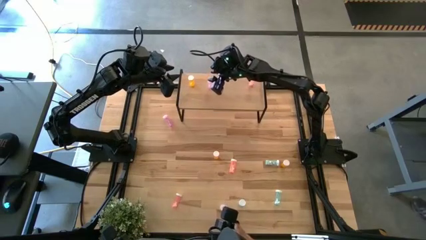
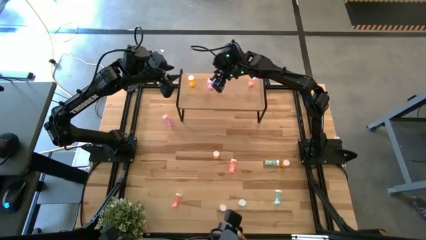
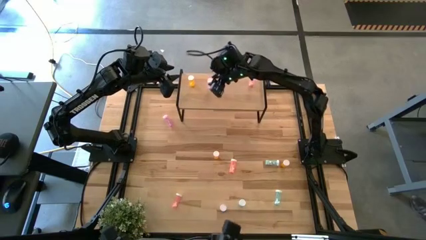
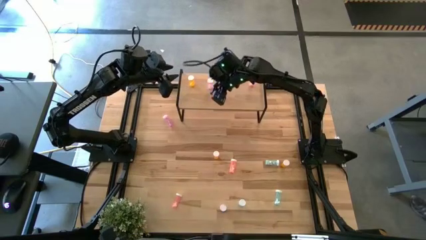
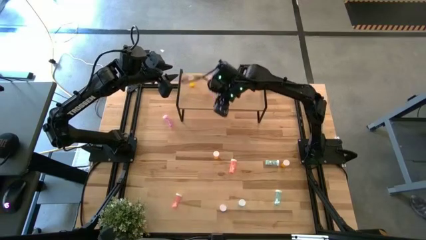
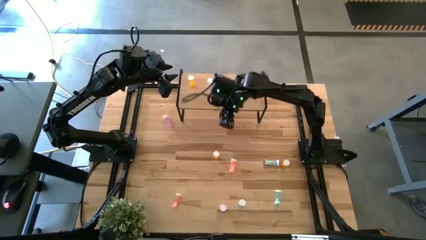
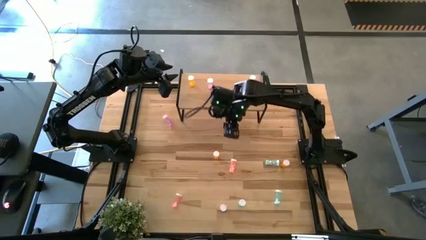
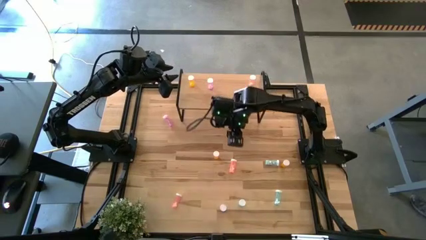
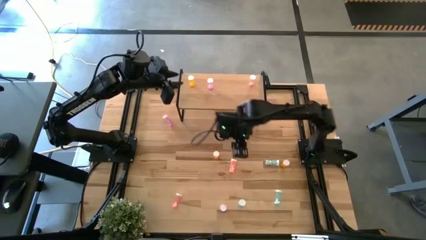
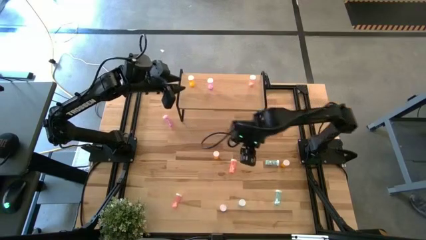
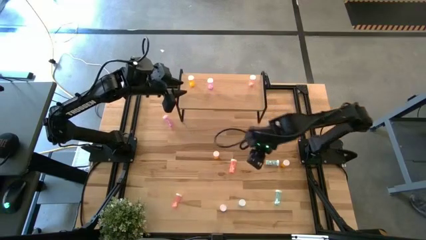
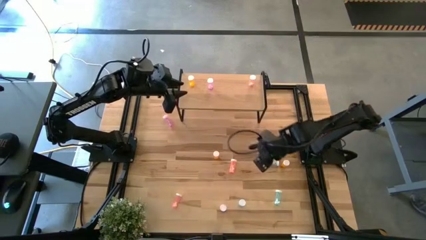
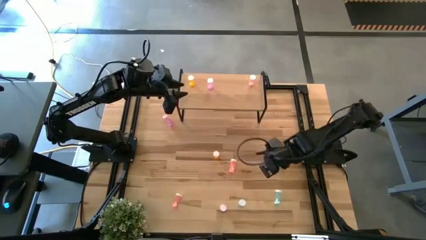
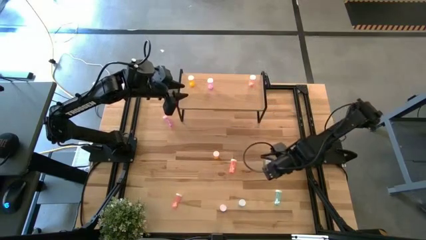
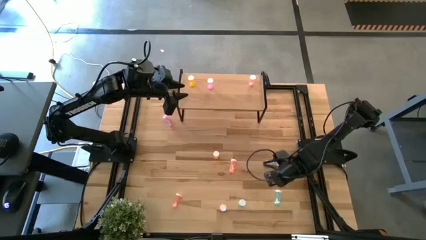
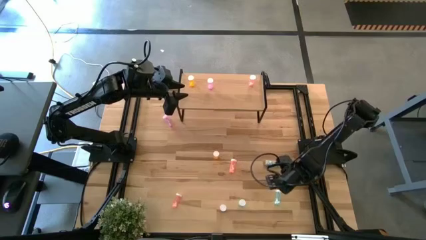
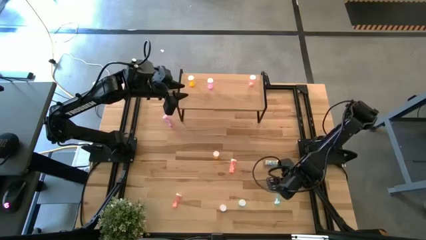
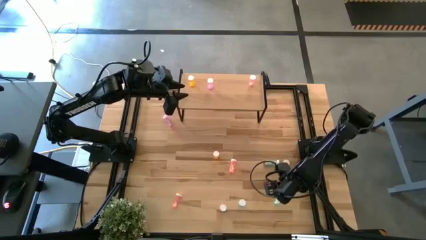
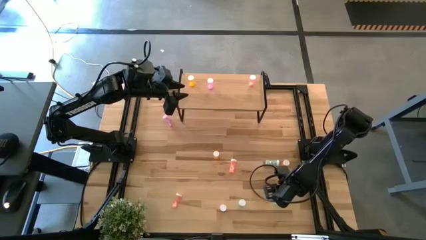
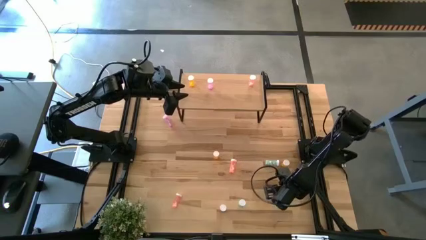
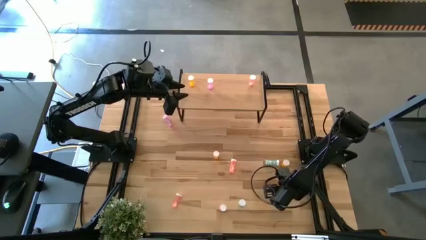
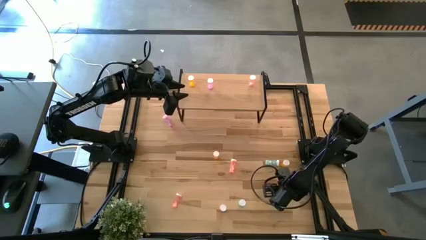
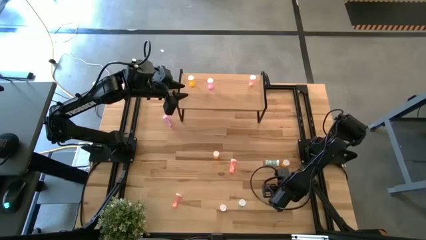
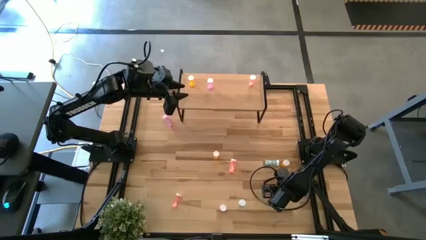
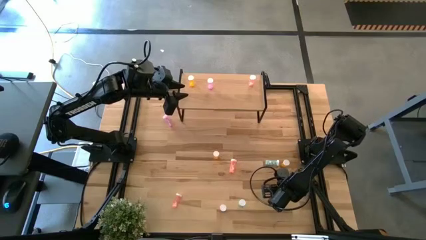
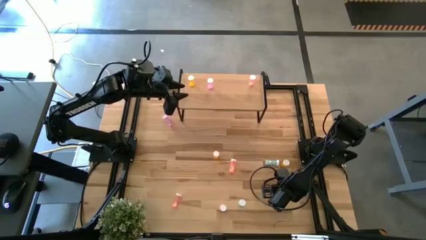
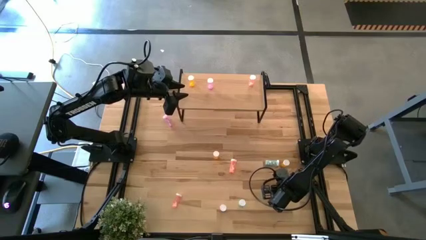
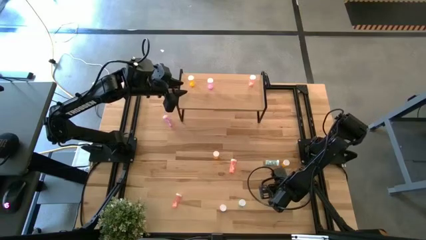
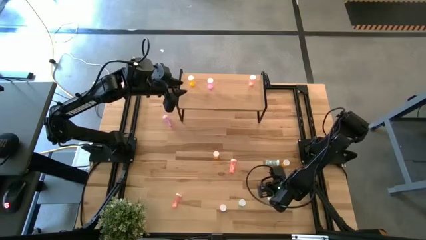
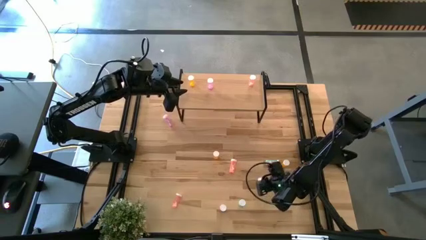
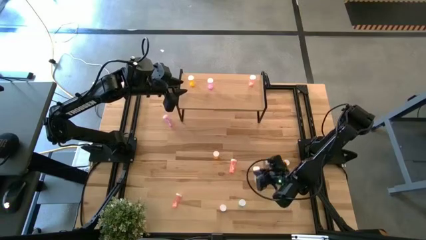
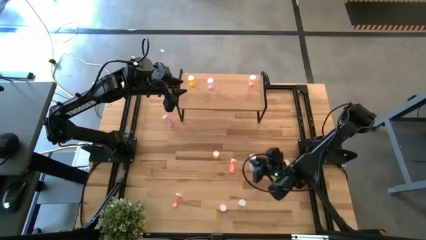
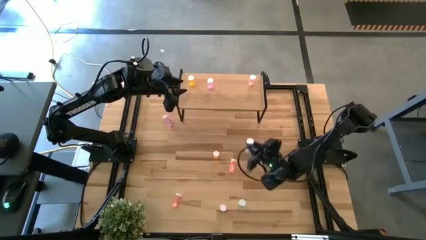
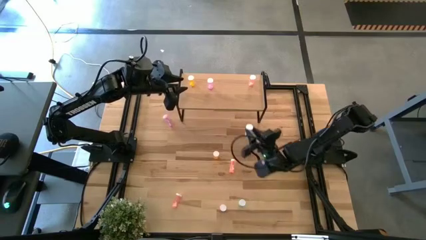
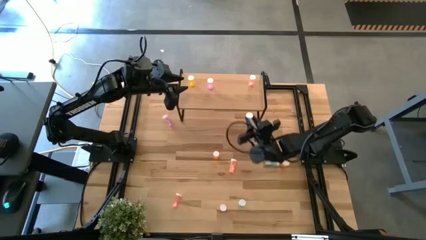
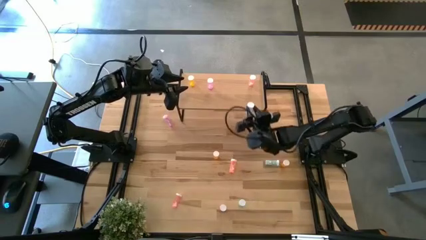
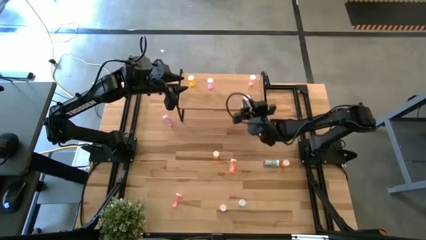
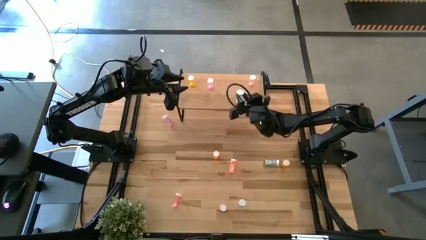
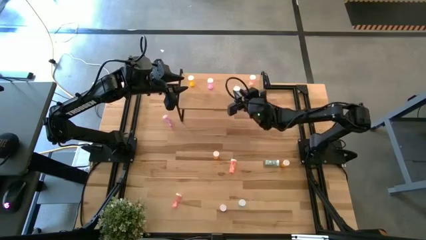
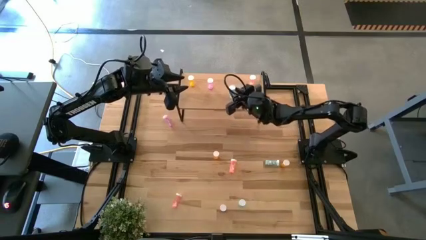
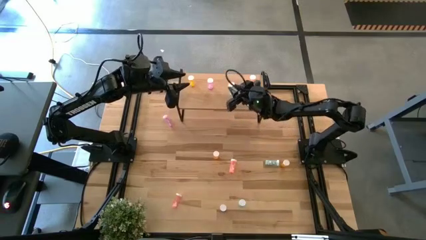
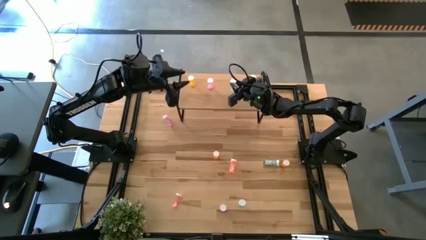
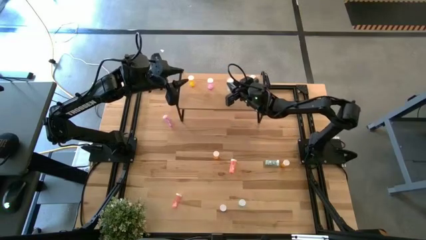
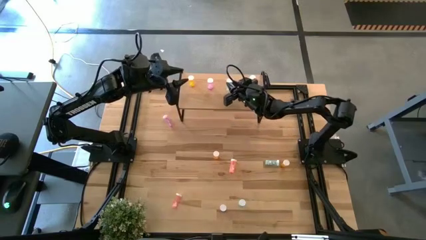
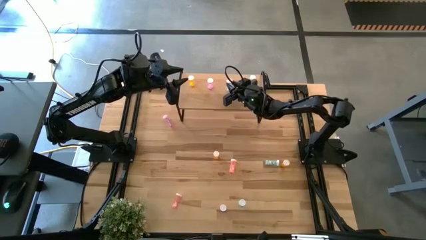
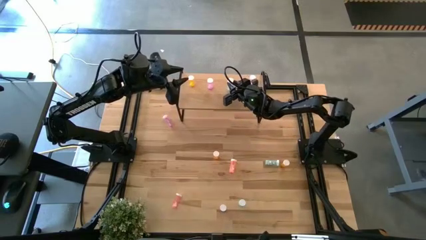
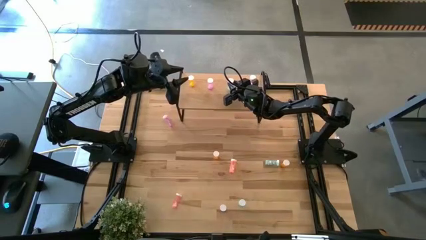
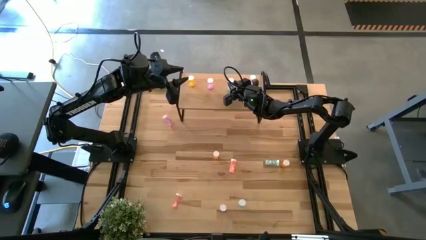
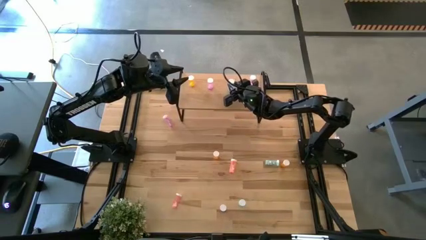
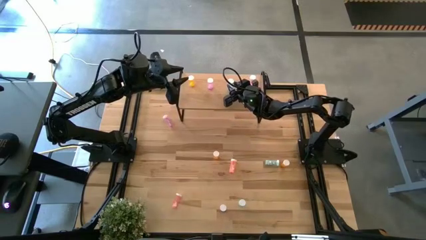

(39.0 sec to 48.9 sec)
Task: Pick and place medicine bottles onto shelf by color
Put the bottom right blue medicine bottle on the shelf

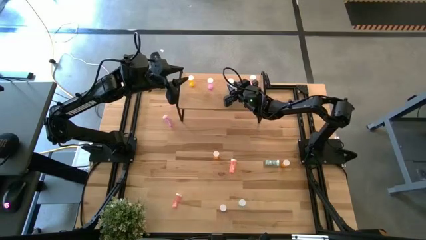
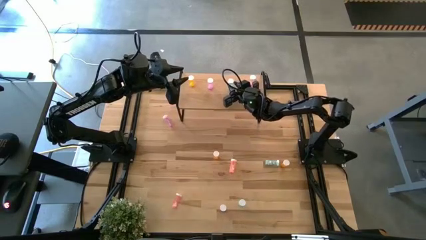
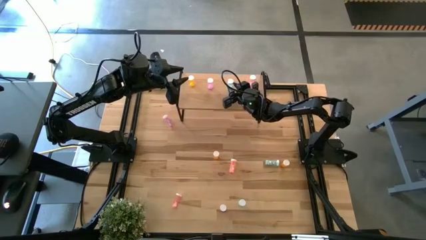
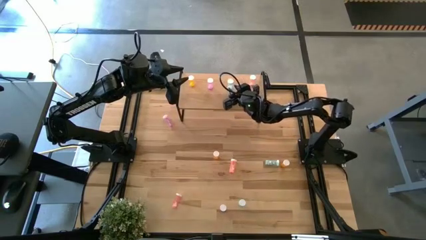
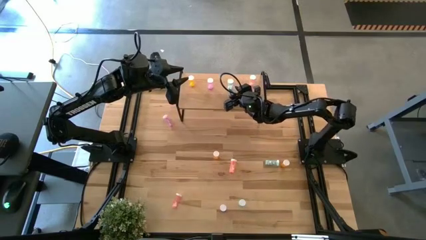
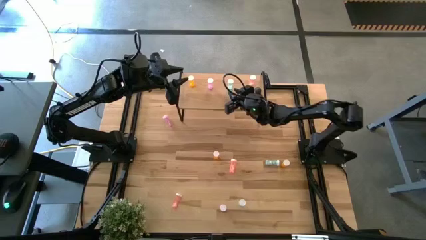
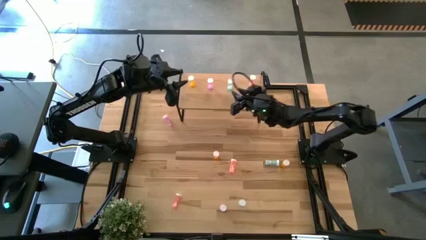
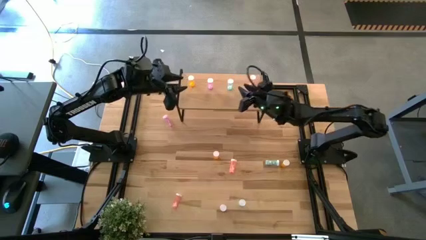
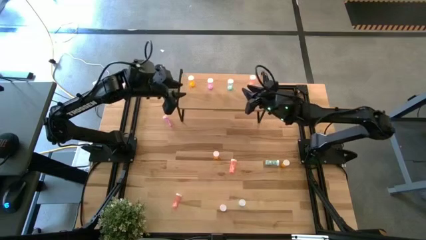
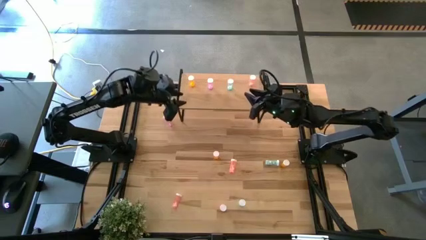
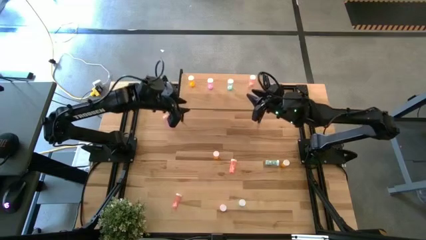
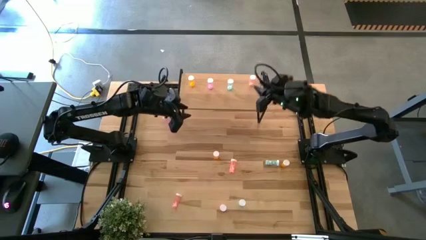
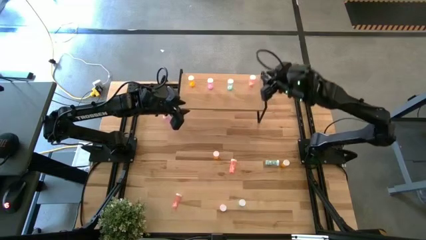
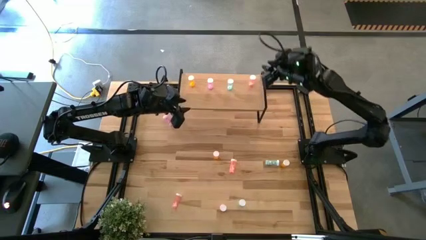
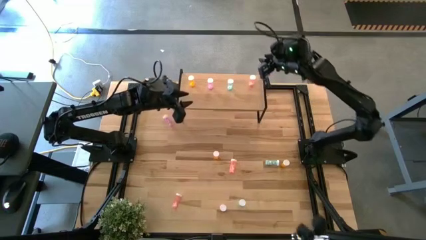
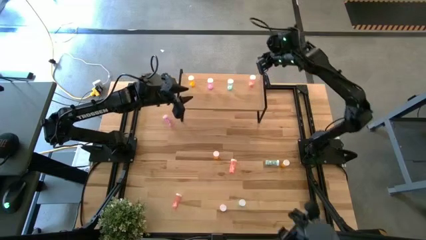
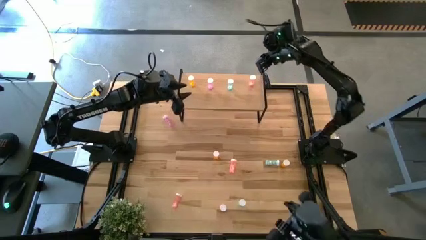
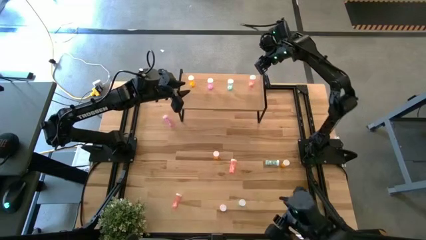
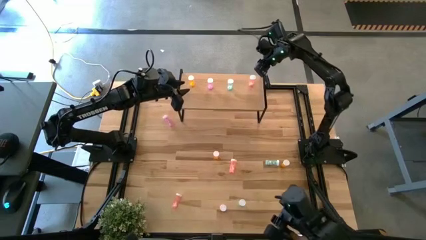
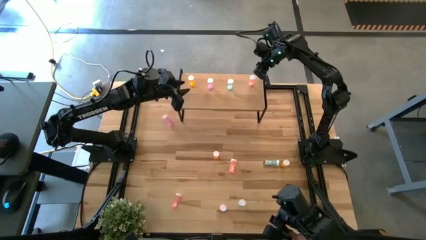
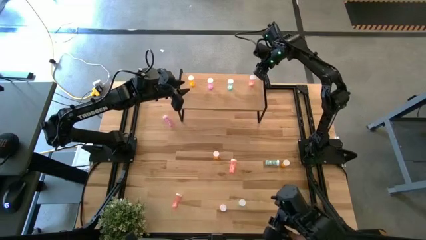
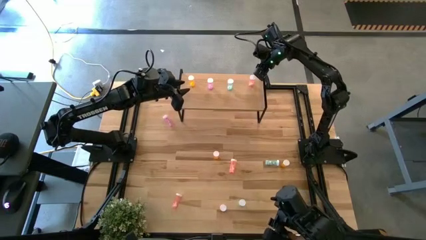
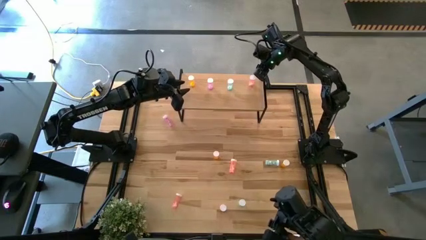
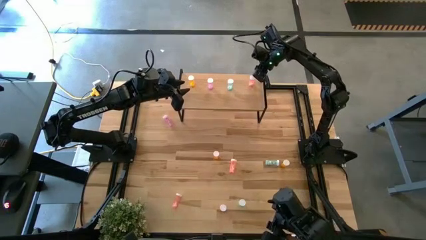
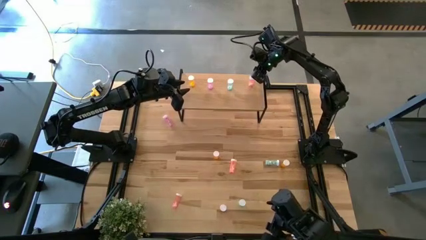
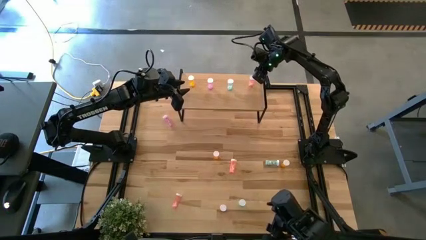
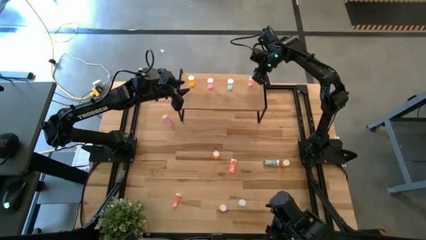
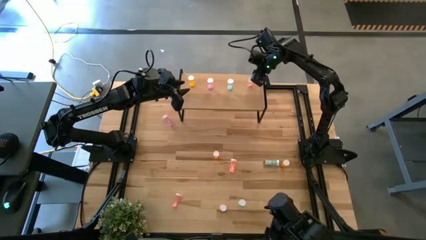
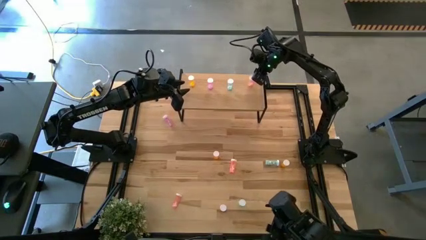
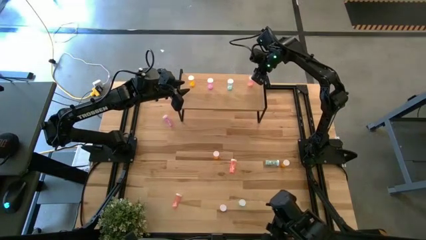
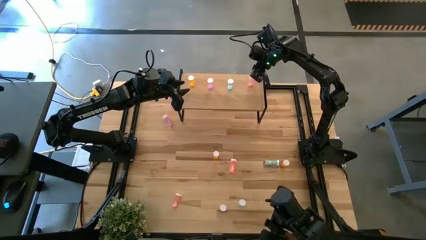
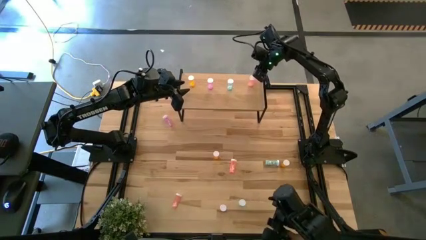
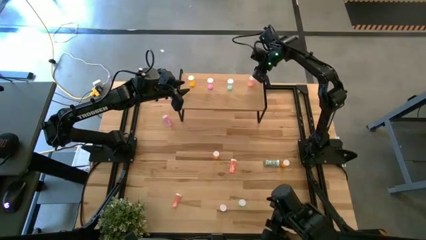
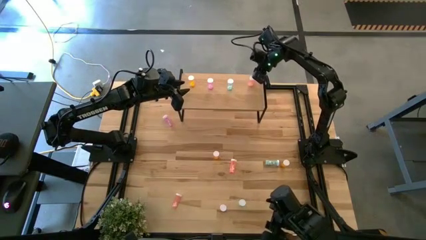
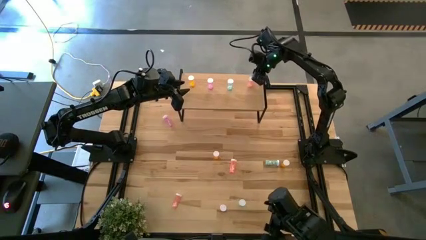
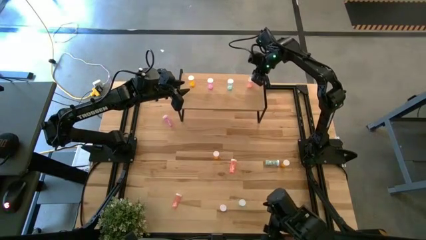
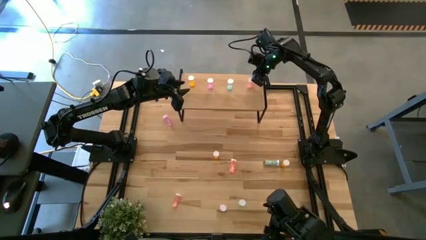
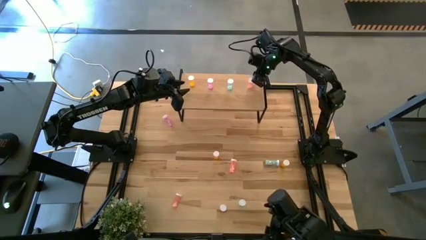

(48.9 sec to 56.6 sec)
Adjust the pink medicine bottle
